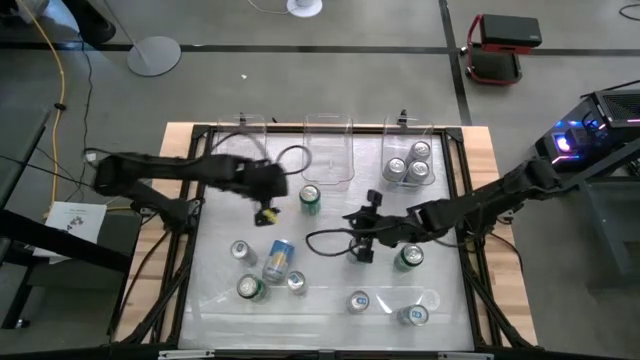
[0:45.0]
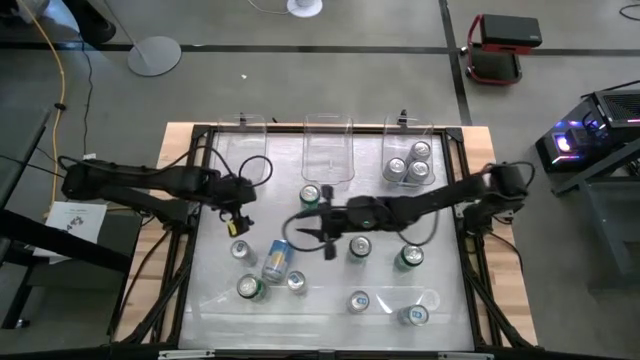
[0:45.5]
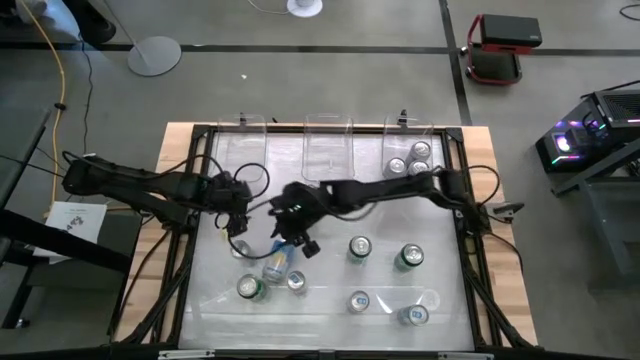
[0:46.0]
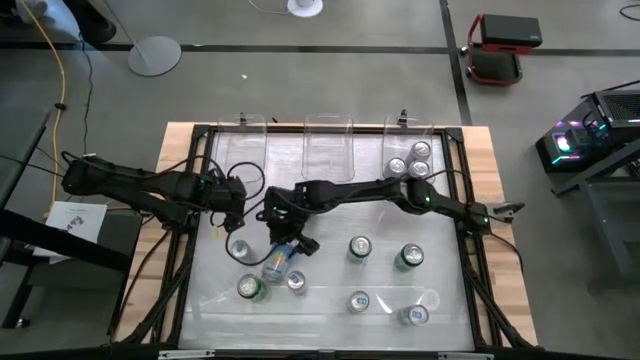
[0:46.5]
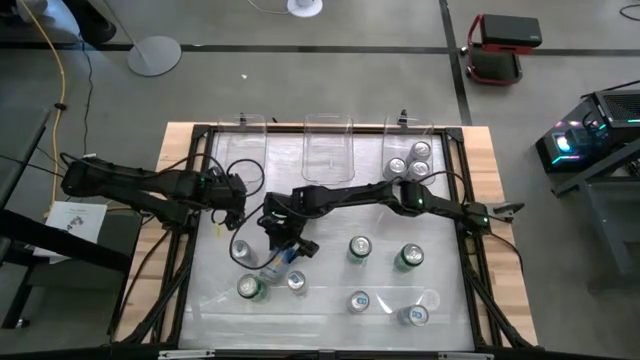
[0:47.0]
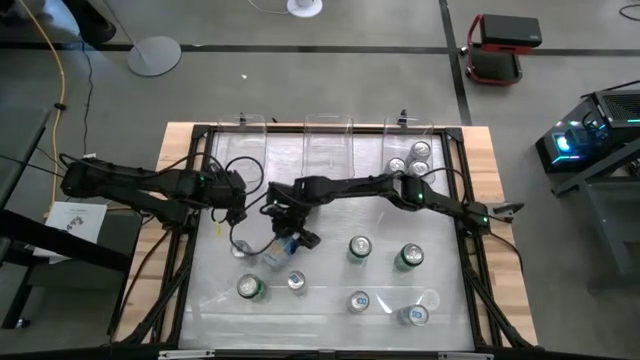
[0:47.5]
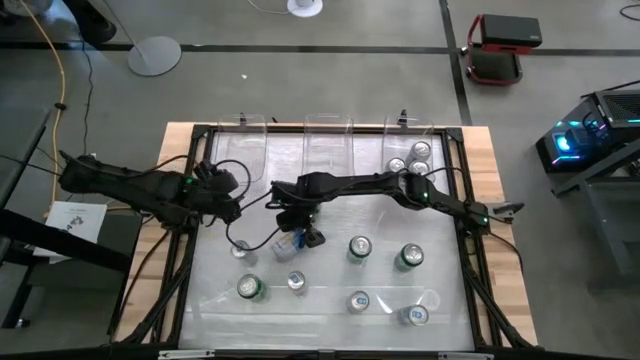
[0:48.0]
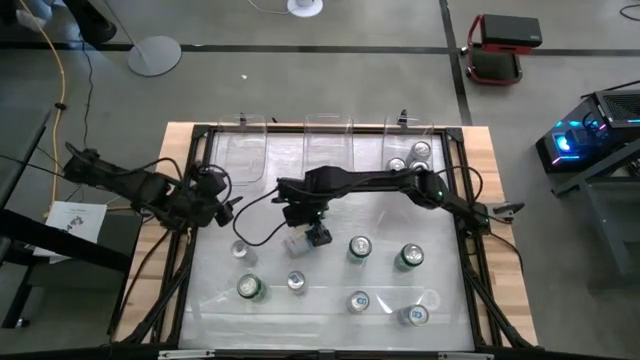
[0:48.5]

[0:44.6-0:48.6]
Task: Sort soda cans
Put the blue-white soda can into the right transparent bin

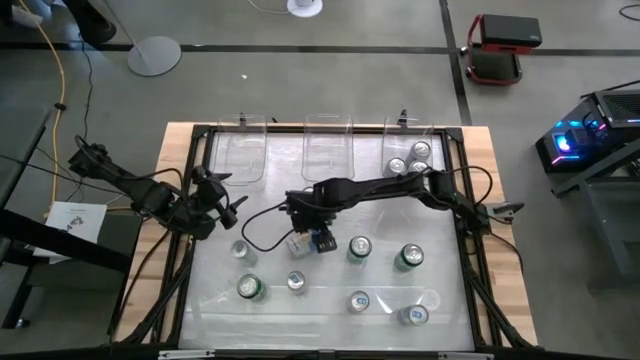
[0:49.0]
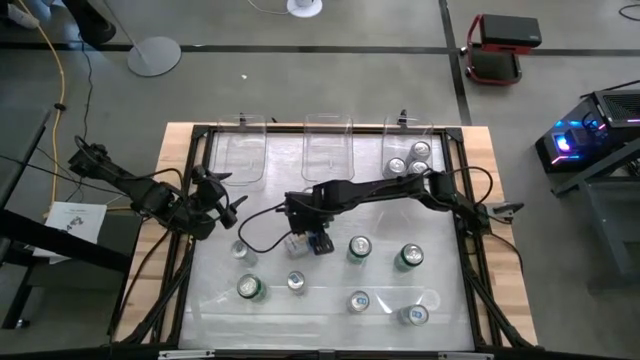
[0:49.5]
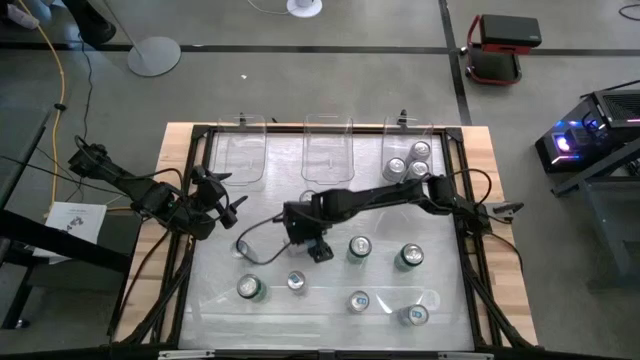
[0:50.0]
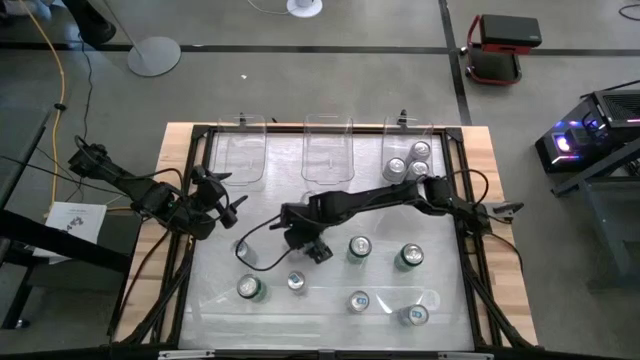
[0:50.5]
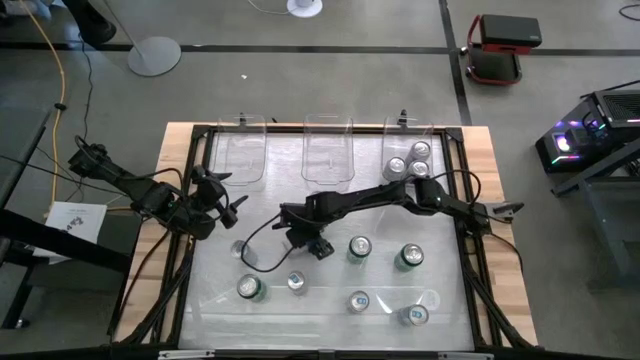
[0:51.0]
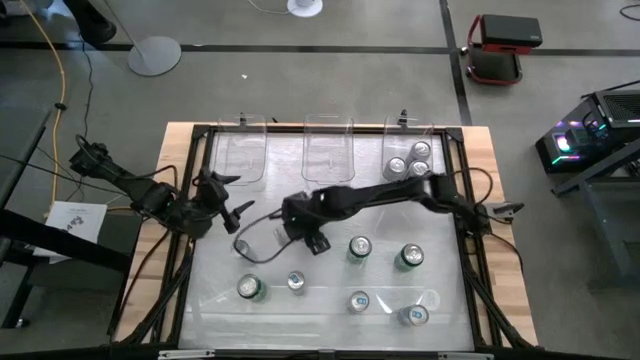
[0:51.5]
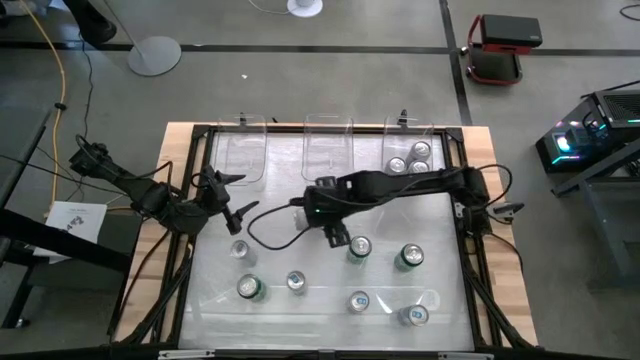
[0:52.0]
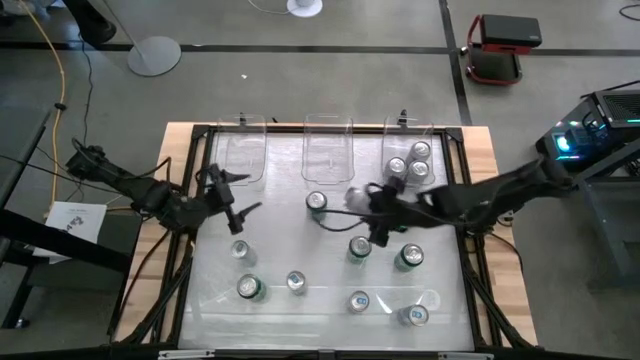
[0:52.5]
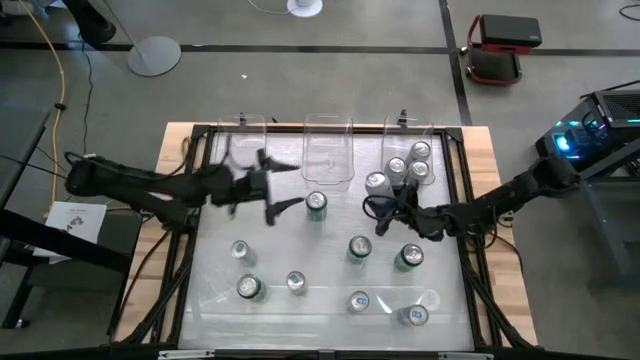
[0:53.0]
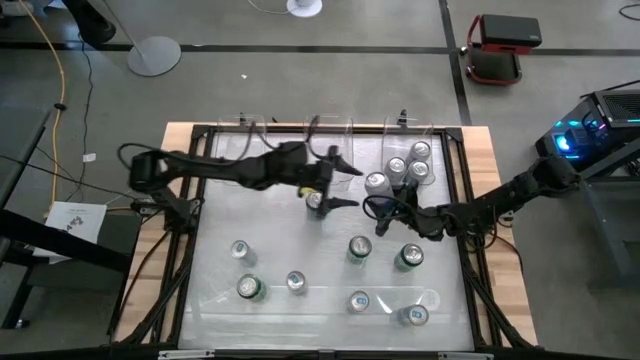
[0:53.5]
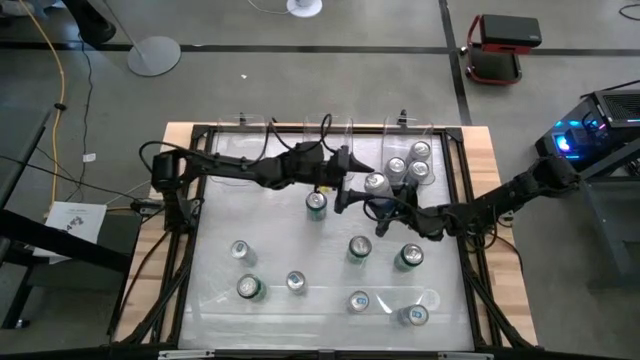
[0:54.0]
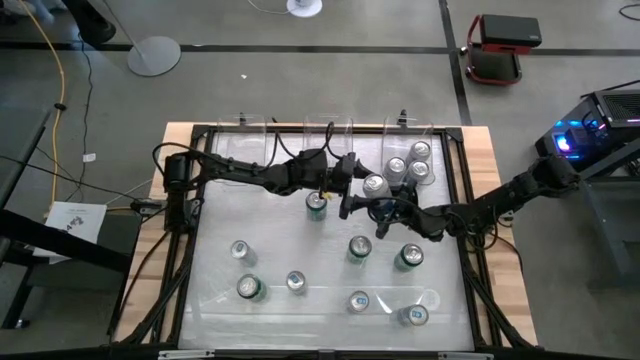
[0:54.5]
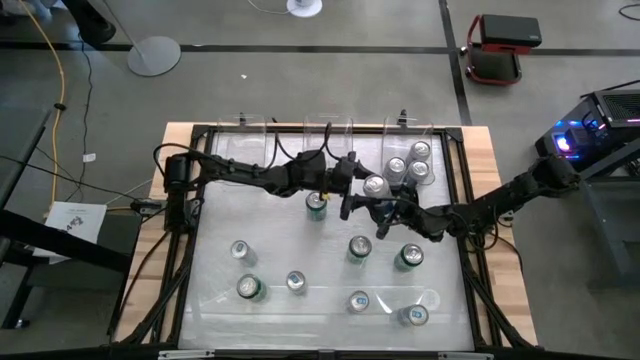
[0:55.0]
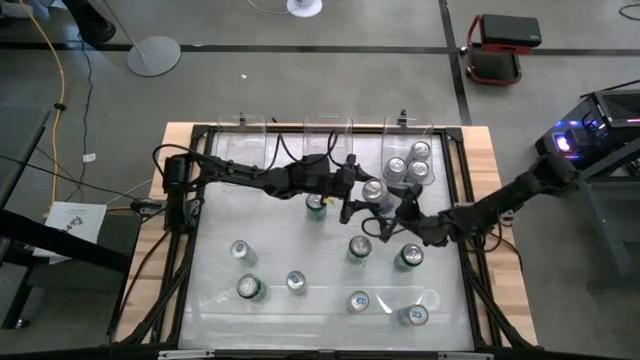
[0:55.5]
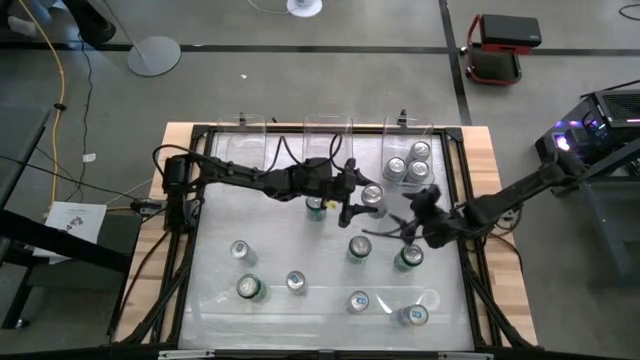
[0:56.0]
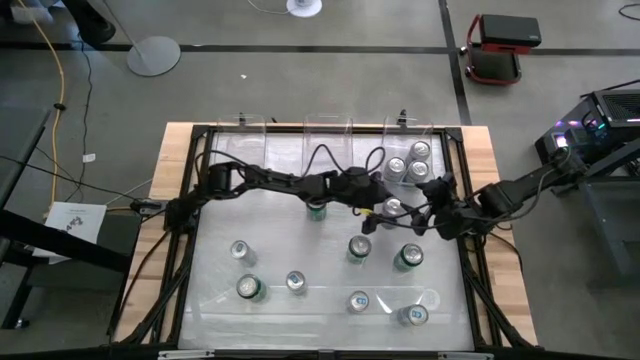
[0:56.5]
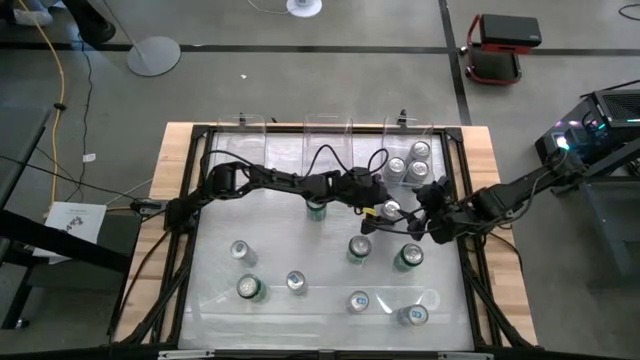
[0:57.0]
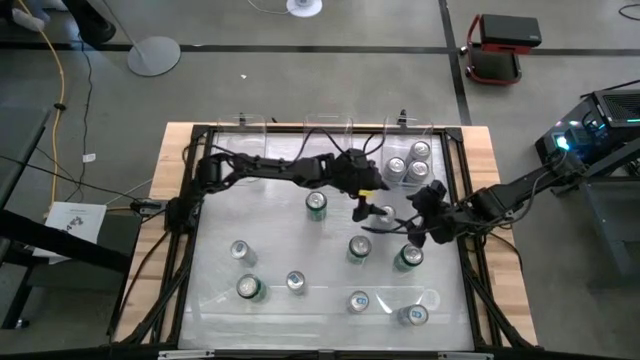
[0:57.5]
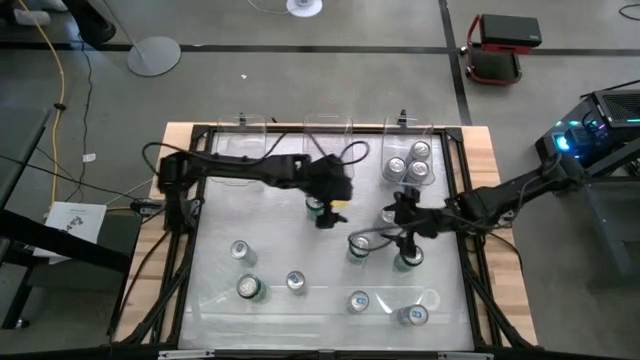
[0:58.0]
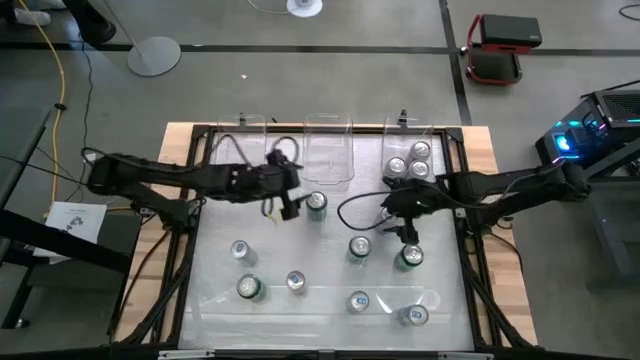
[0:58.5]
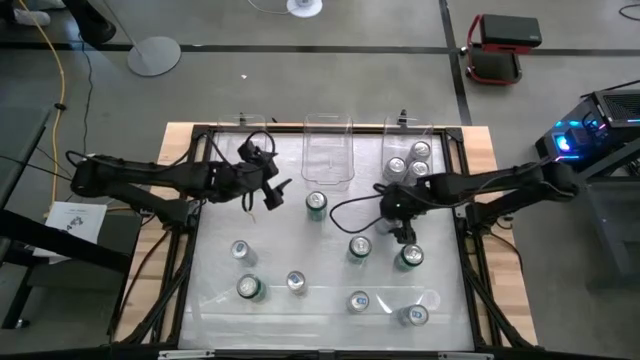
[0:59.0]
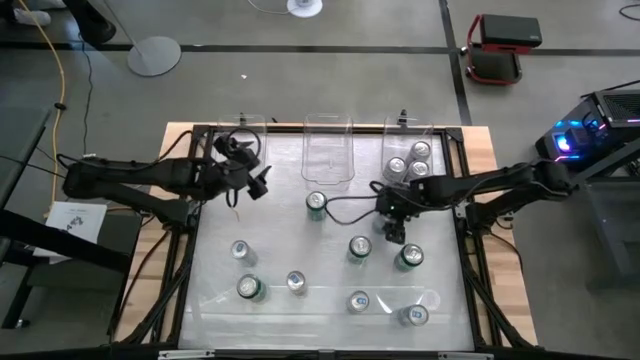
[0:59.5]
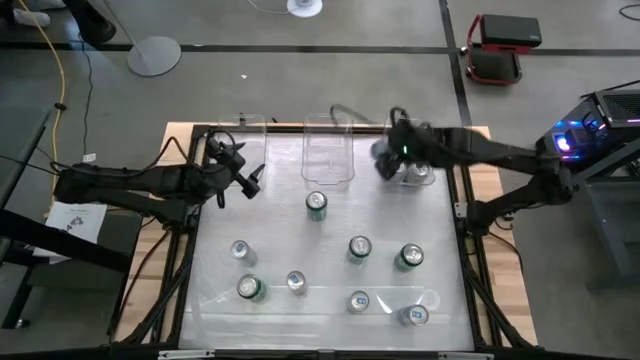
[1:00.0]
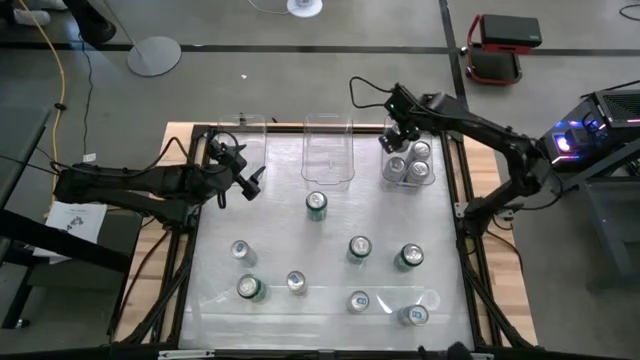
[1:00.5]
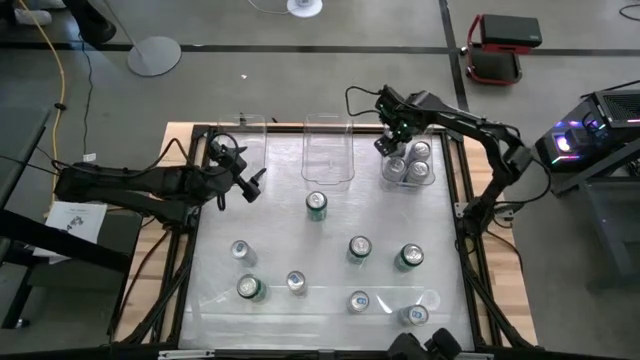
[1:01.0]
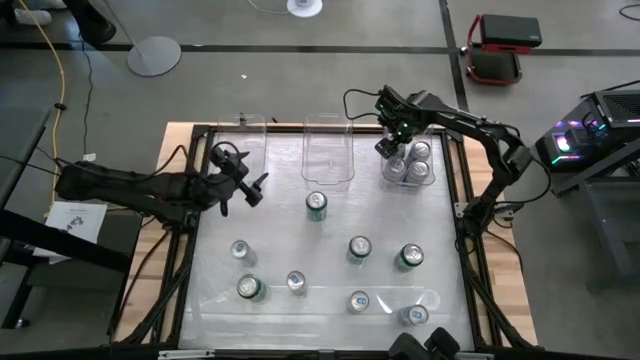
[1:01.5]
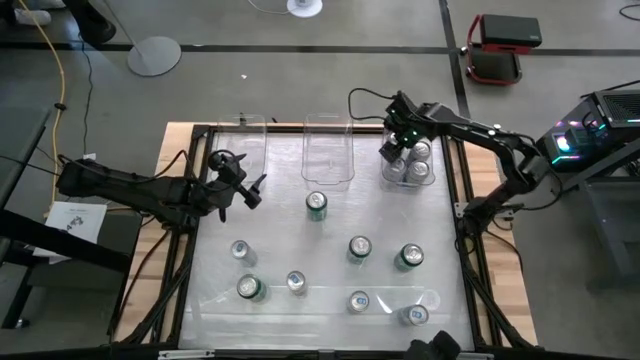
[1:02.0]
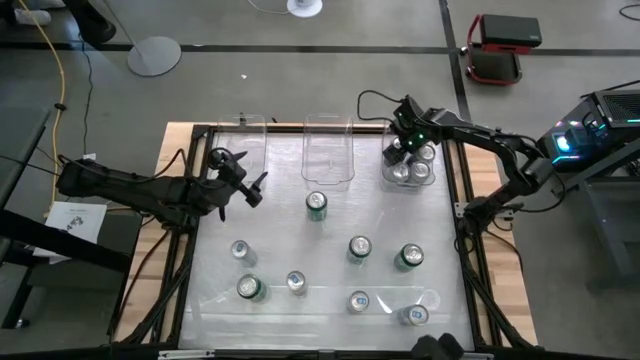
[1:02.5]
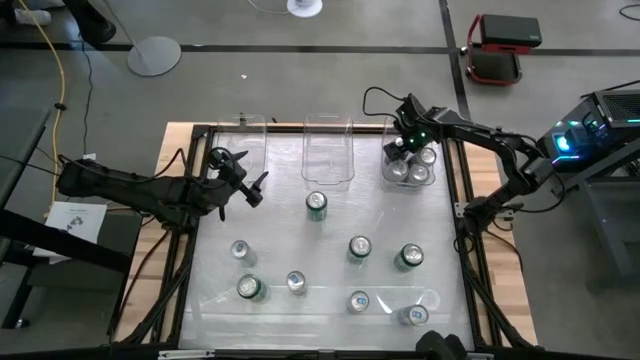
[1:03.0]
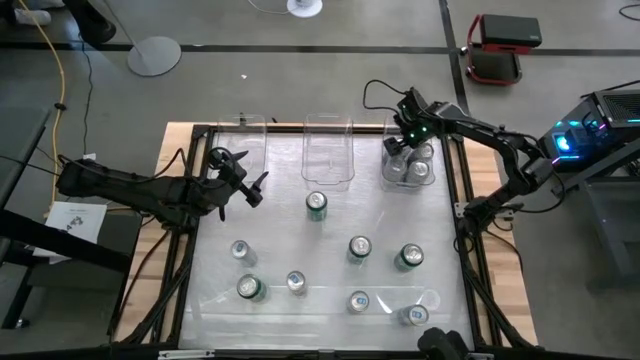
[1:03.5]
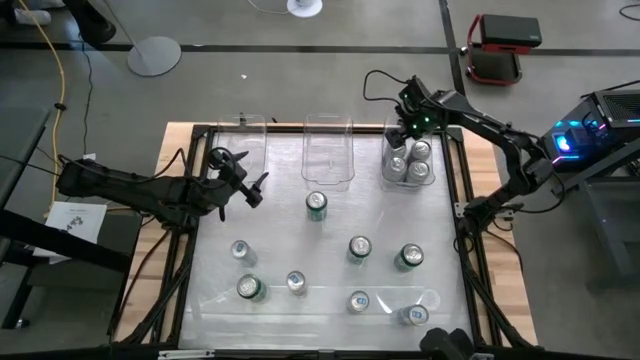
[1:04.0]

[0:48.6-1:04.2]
Put the blue-white soda can into the right transparent bin
